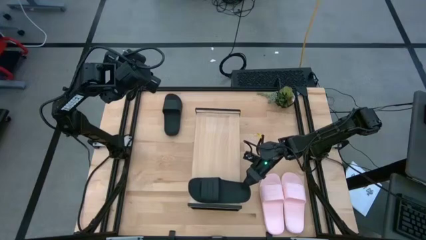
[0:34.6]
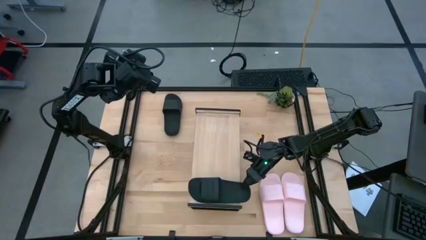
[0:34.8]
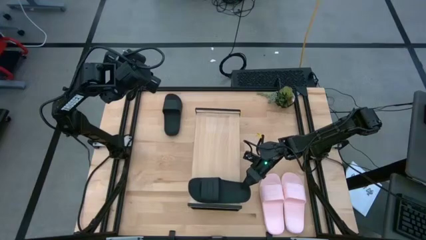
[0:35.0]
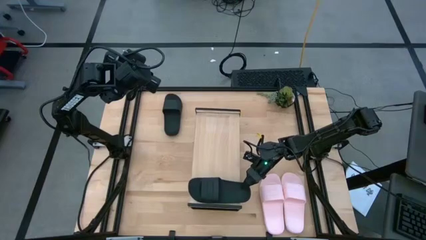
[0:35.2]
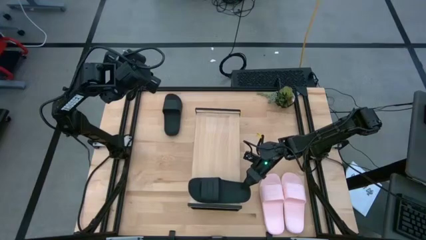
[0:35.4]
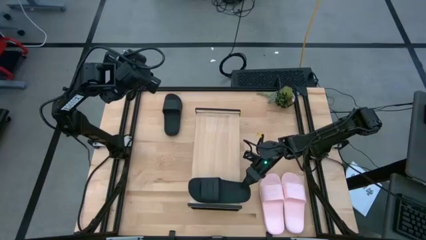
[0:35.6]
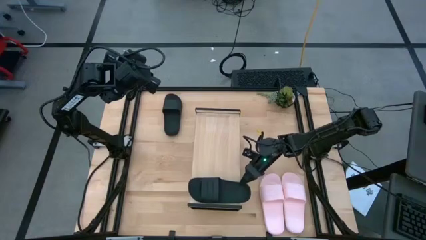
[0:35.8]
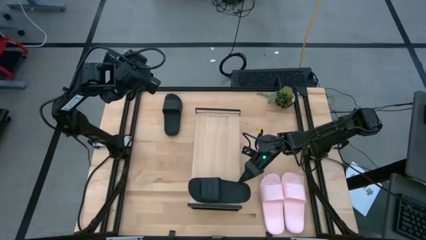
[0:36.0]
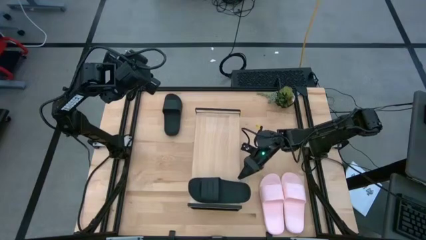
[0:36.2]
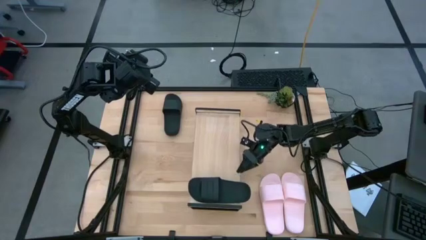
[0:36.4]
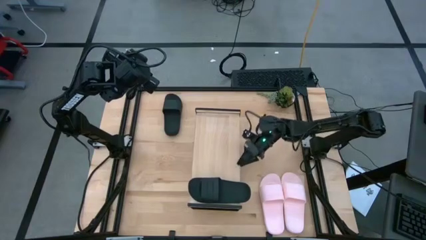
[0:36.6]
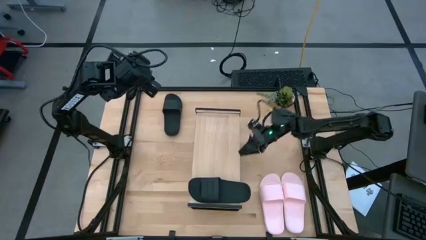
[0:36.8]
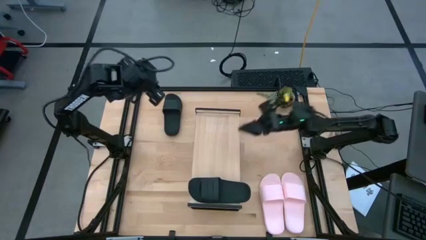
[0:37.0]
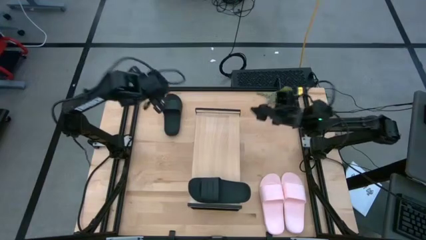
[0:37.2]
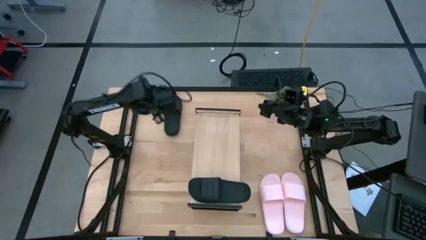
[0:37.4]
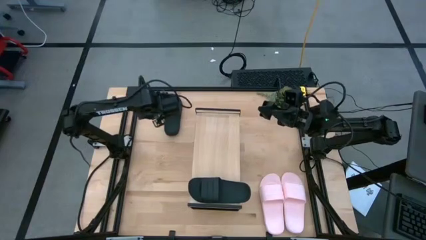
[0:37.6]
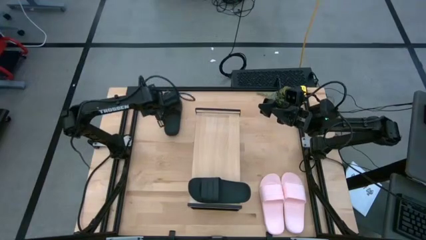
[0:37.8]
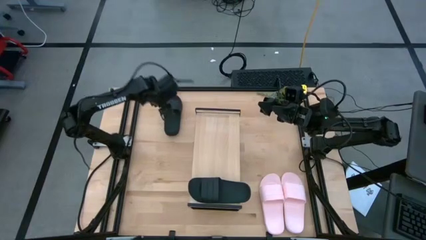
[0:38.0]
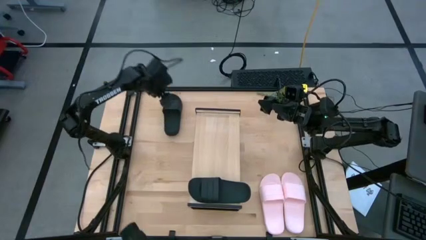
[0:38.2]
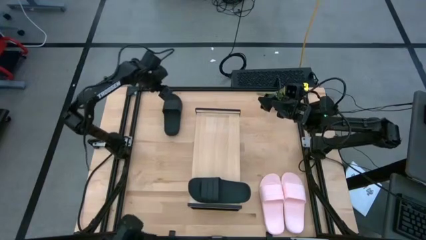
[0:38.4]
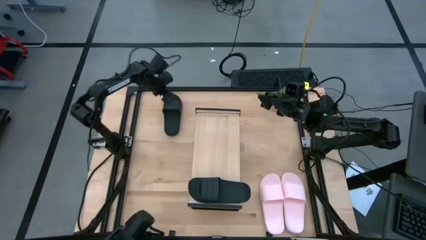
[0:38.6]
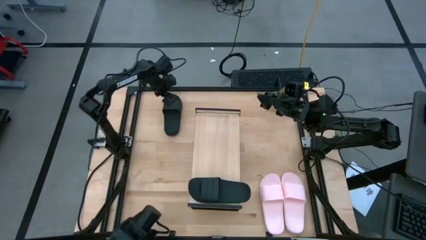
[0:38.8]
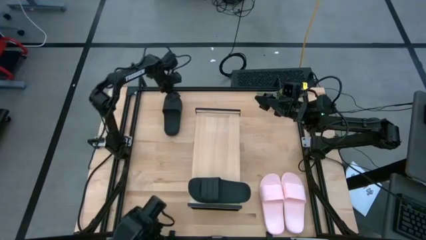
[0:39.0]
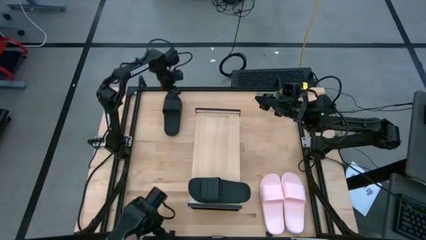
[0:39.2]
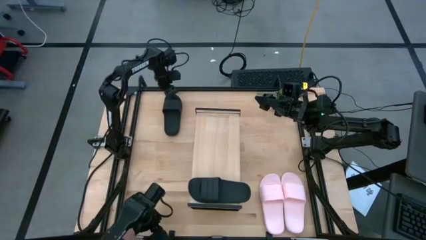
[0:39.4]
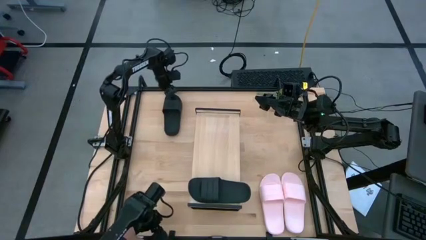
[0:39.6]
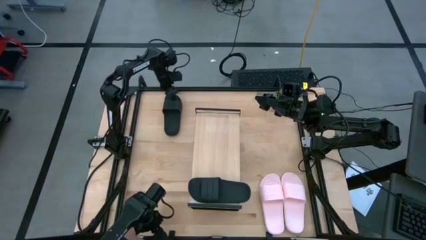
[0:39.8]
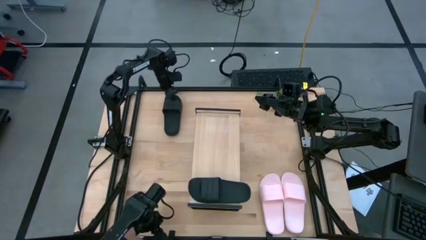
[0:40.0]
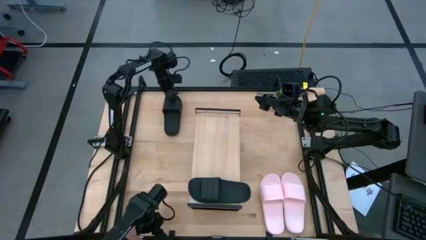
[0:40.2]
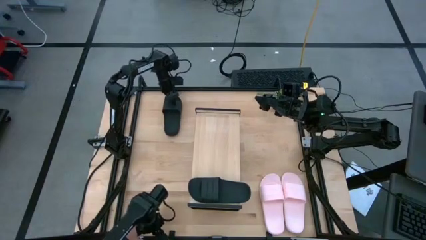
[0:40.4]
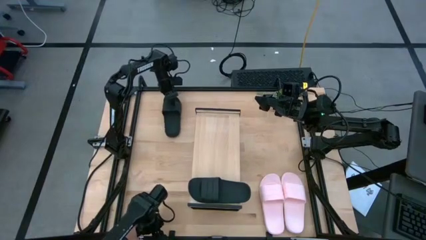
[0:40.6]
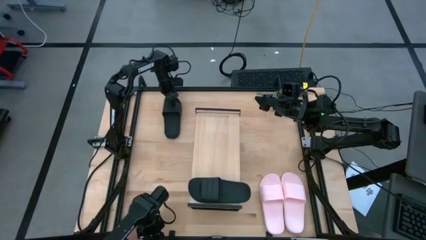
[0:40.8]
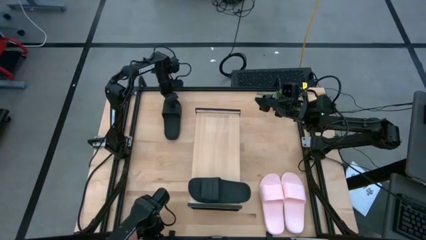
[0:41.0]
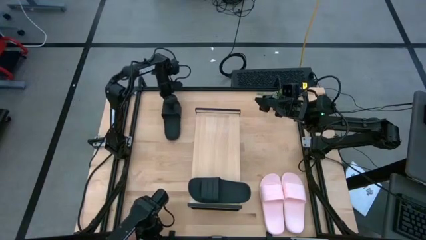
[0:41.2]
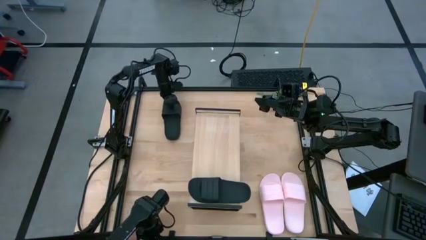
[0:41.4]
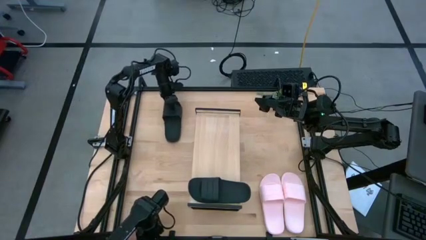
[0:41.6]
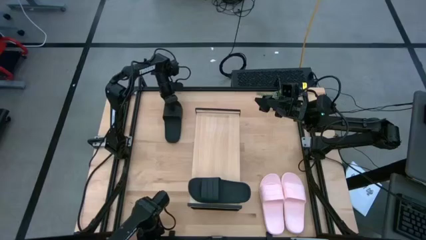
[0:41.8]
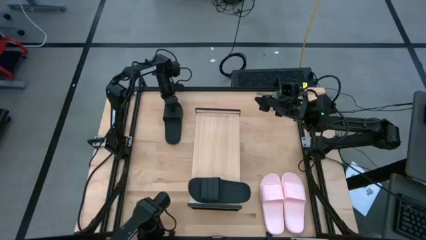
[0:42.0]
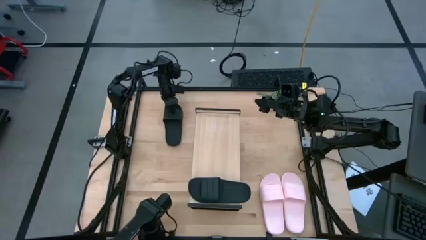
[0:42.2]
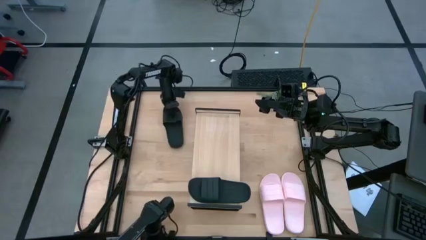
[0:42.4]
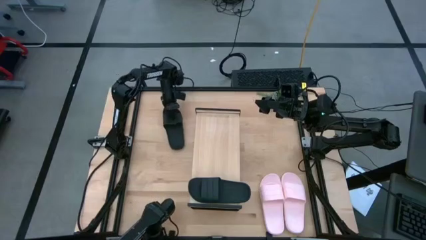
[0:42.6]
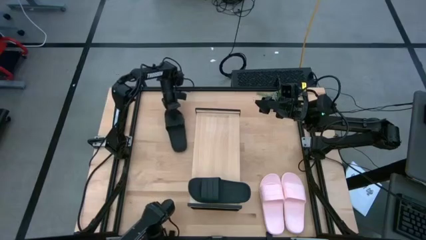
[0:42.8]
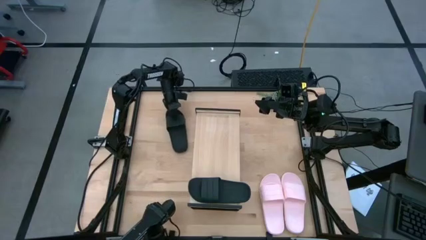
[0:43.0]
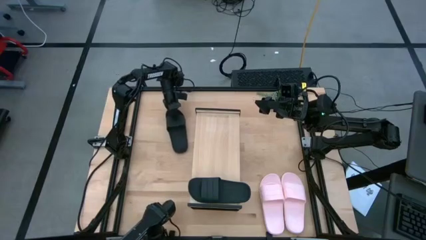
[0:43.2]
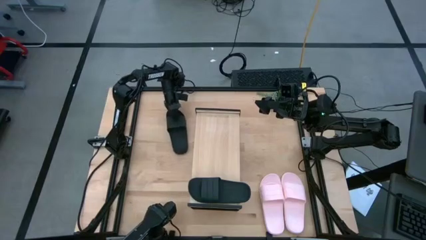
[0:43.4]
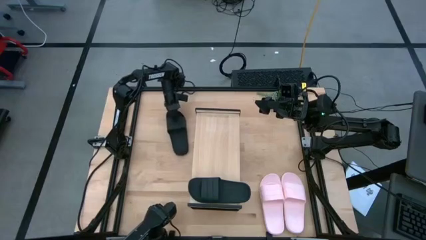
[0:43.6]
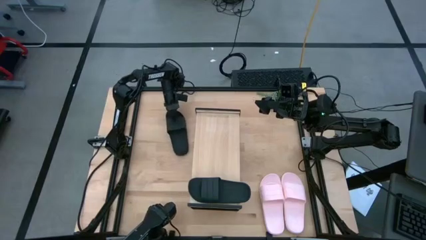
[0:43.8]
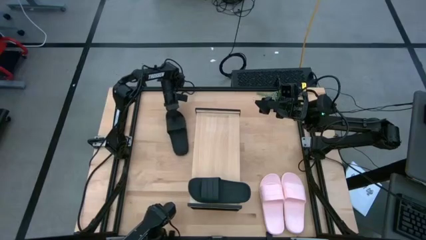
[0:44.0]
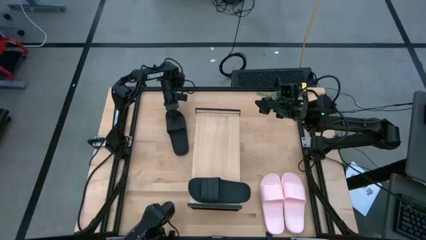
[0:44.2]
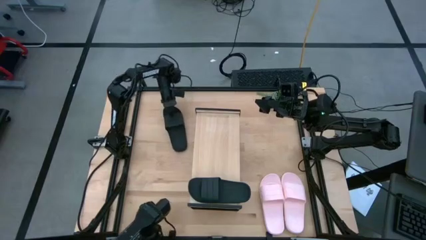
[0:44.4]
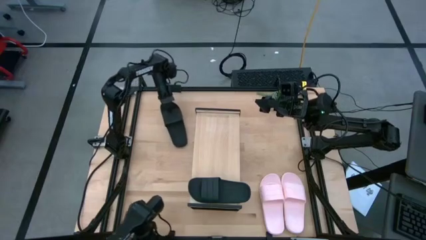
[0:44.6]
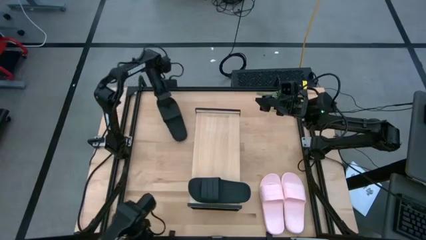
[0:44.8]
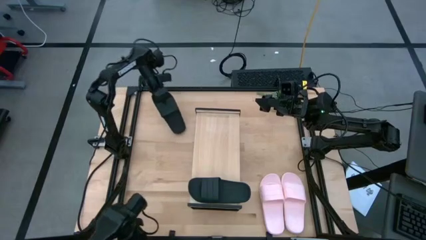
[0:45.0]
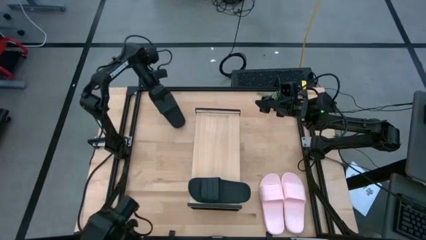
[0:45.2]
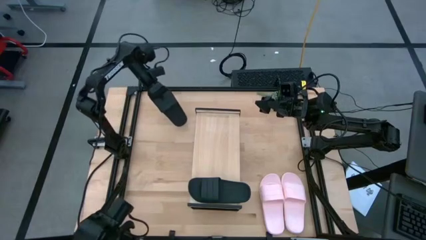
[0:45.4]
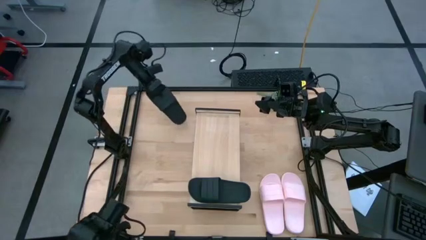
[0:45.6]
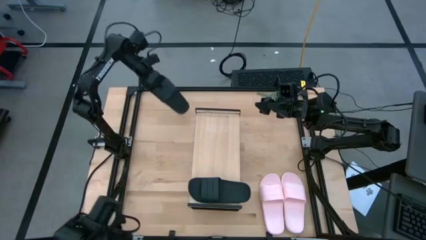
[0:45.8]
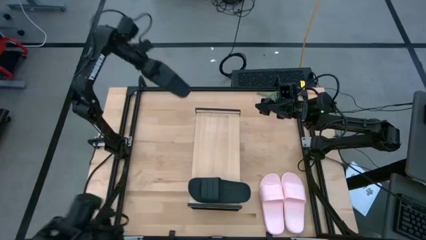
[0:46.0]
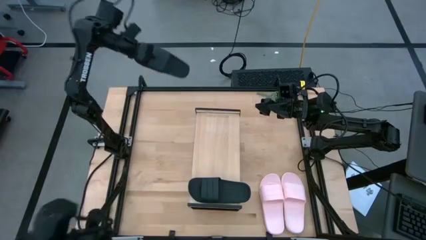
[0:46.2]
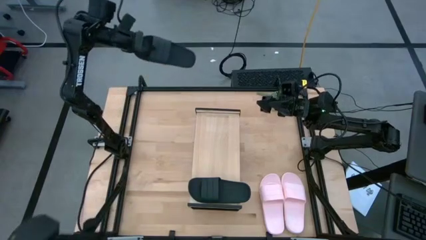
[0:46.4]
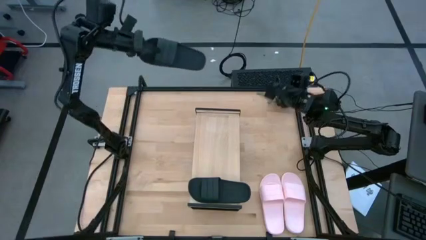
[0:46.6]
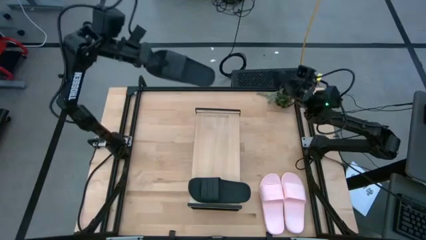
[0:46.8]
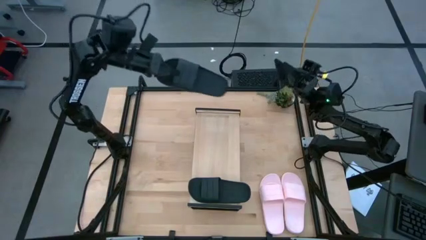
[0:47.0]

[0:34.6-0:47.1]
Task: Pick and place slides into the shelf
Put the black slipper on the shelf

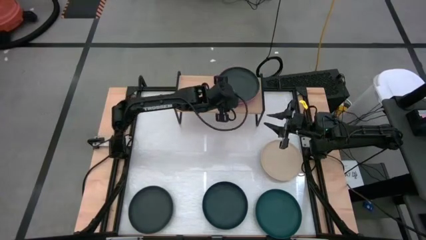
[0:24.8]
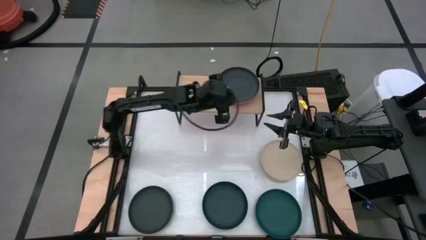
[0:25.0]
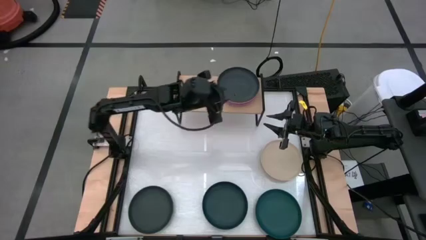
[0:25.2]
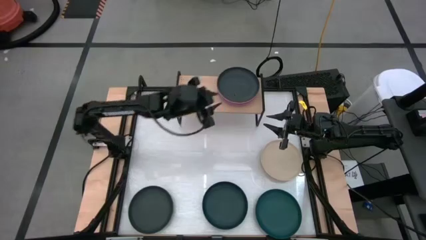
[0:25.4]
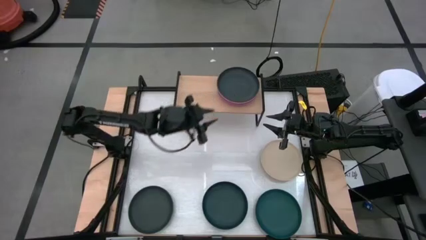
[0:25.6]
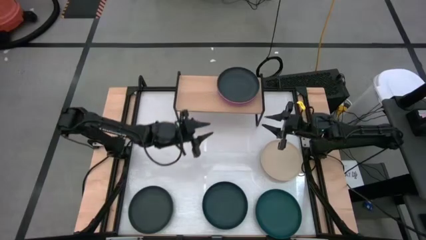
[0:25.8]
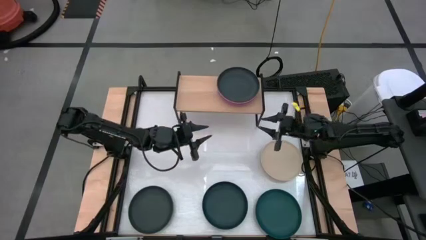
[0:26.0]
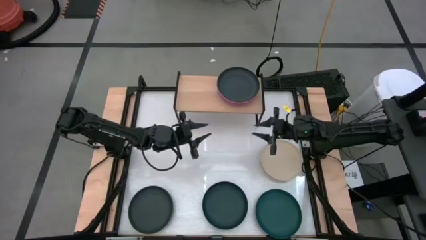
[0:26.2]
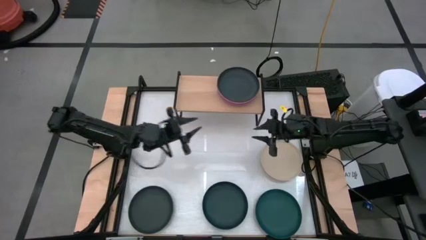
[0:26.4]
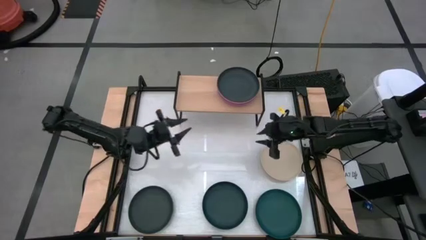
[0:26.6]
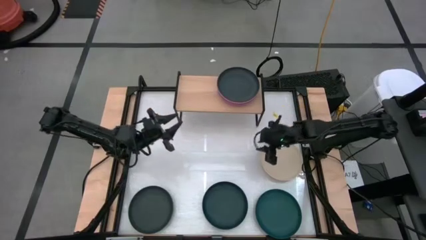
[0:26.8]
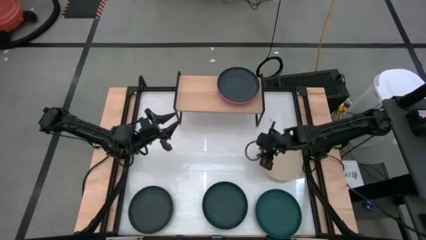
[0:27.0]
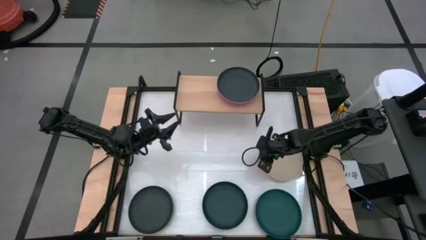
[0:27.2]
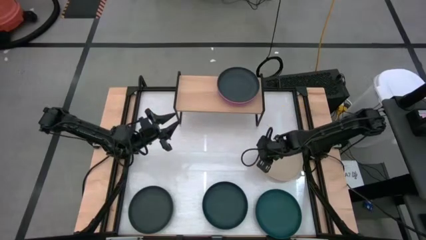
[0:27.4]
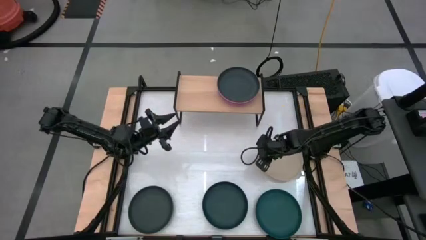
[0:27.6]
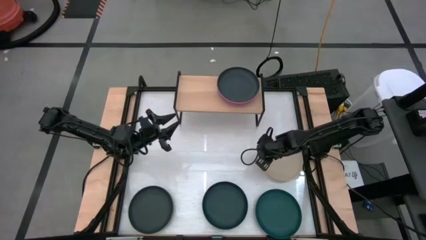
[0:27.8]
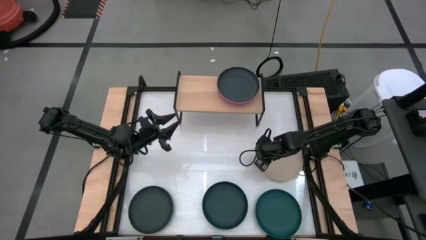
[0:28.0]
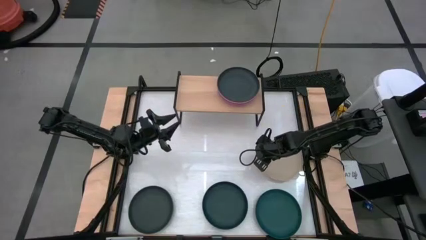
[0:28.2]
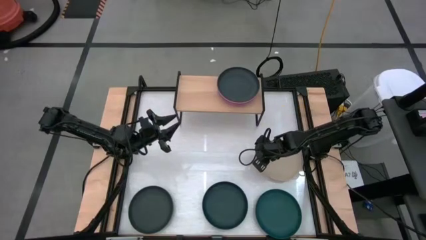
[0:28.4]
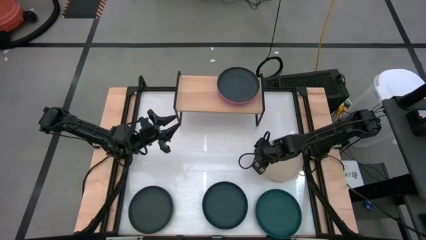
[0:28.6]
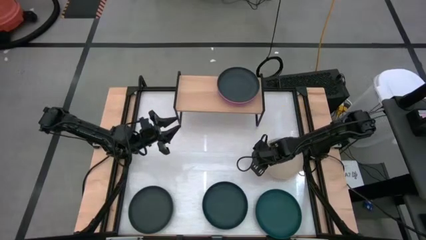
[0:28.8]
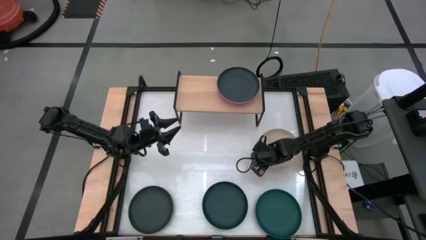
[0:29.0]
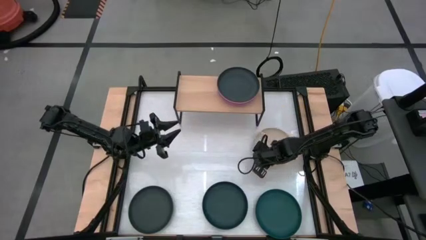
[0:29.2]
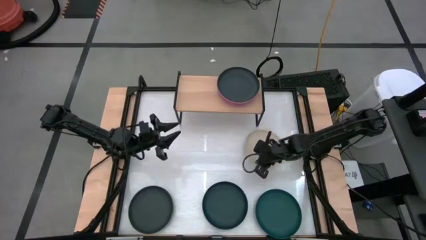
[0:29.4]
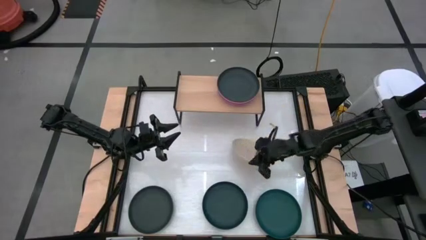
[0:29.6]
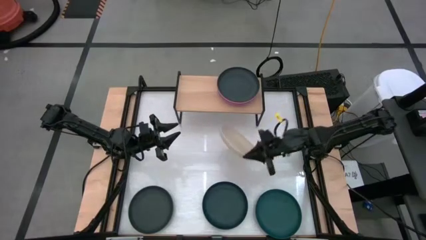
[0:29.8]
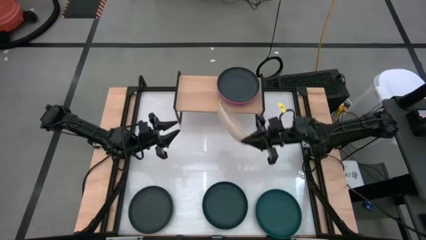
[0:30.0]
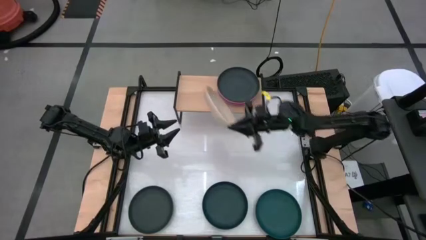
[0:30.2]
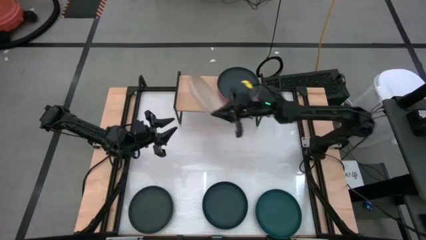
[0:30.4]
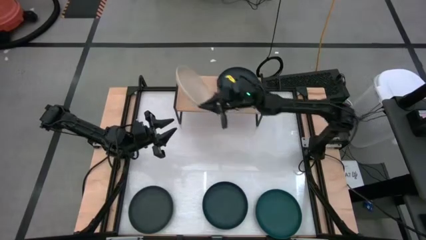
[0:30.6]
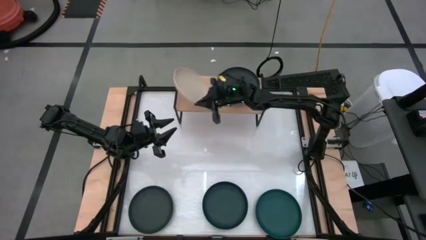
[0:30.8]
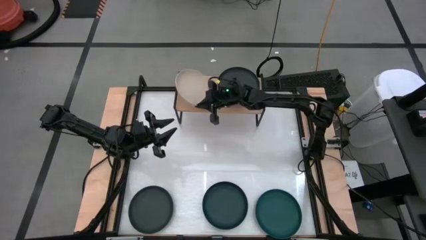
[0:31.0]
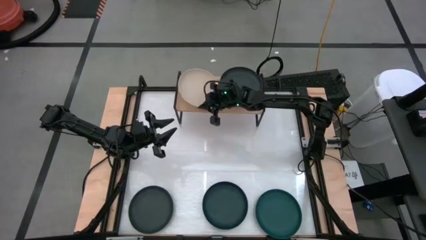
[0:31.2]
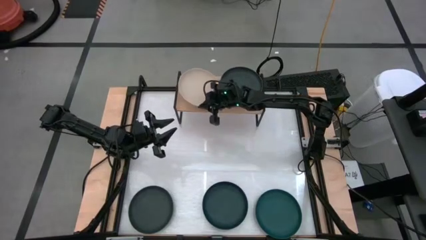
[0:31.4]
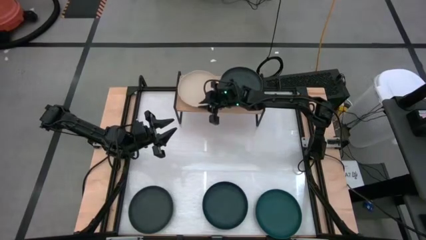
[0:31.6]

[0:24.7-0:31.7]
Task: Place and stack plates onto a shelf
Put the brown plate on the shelf
